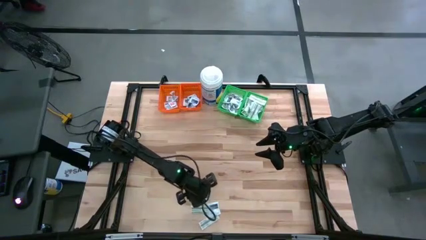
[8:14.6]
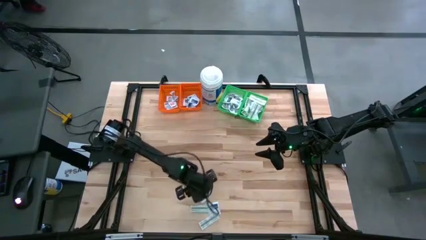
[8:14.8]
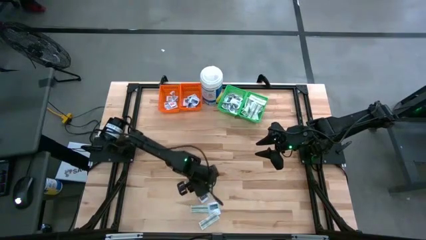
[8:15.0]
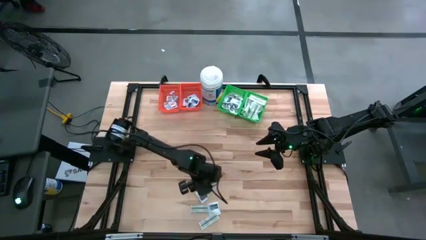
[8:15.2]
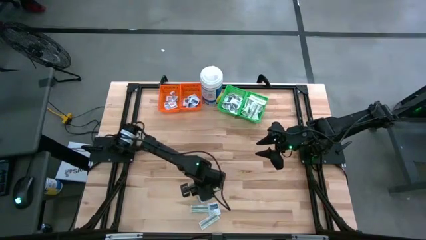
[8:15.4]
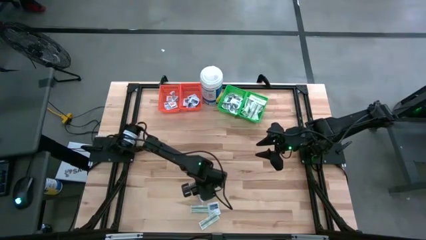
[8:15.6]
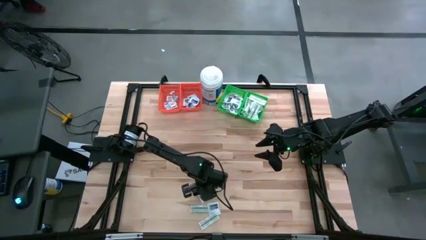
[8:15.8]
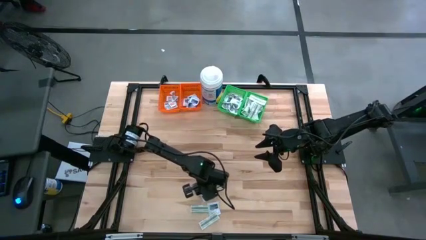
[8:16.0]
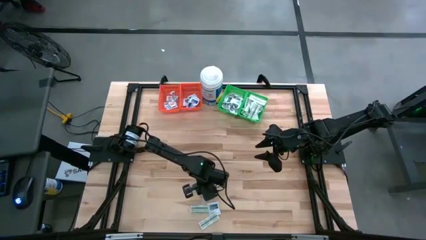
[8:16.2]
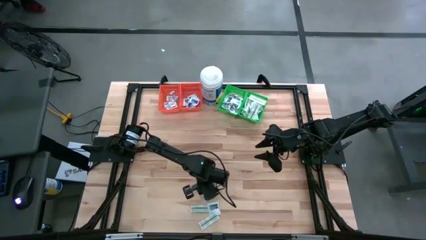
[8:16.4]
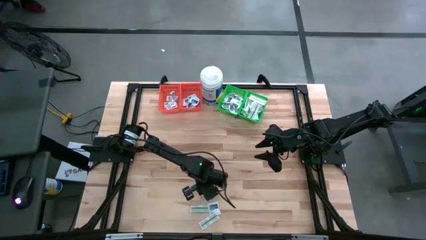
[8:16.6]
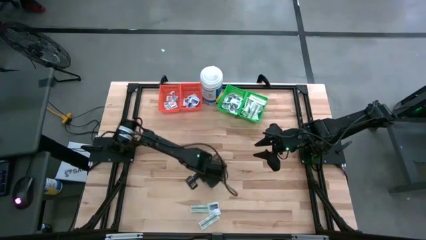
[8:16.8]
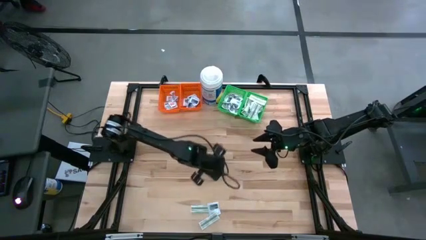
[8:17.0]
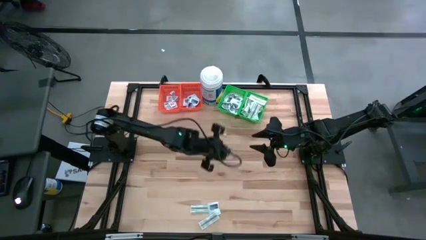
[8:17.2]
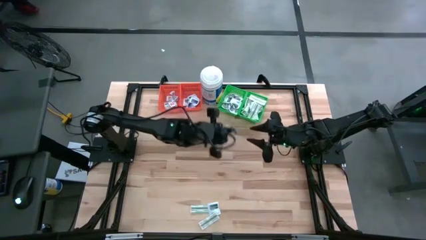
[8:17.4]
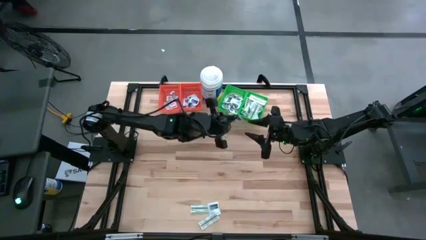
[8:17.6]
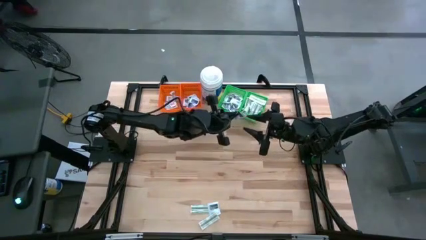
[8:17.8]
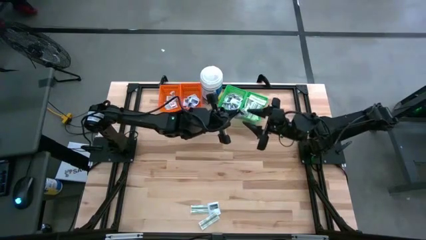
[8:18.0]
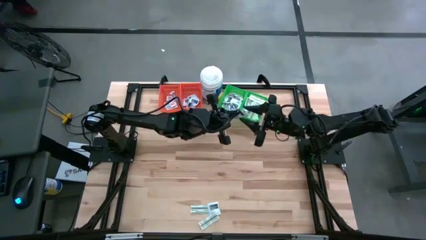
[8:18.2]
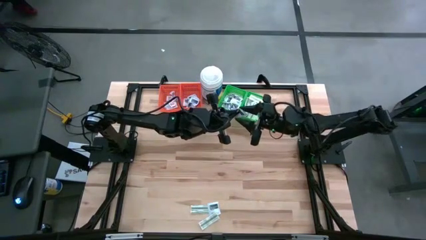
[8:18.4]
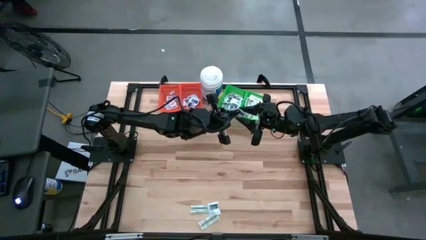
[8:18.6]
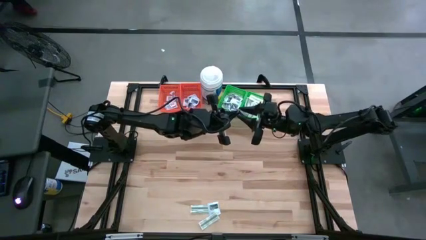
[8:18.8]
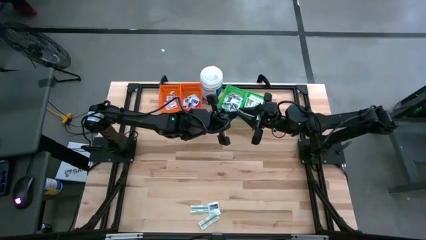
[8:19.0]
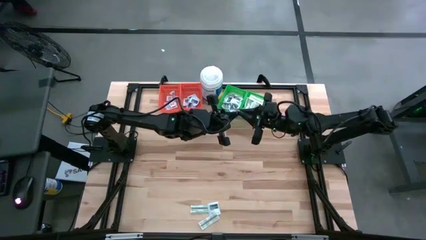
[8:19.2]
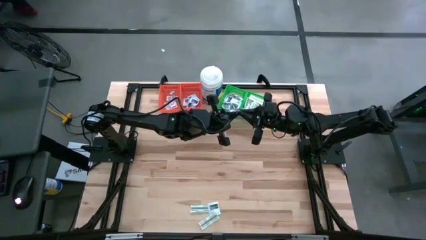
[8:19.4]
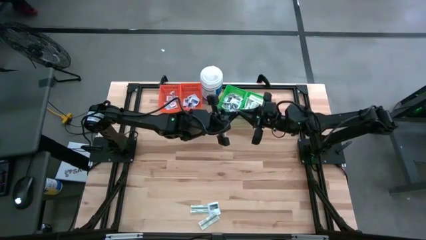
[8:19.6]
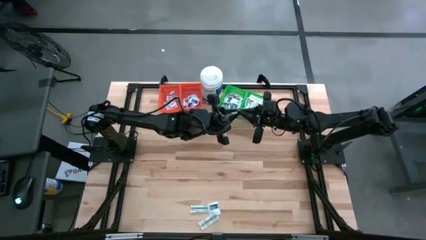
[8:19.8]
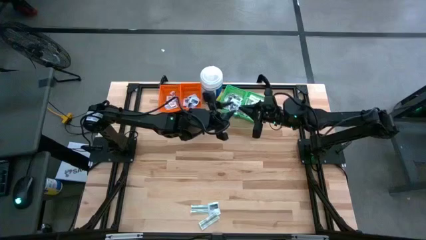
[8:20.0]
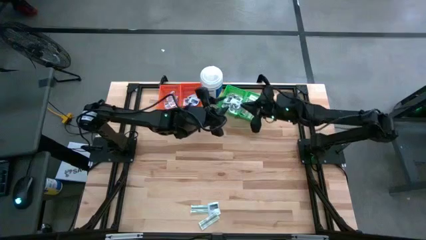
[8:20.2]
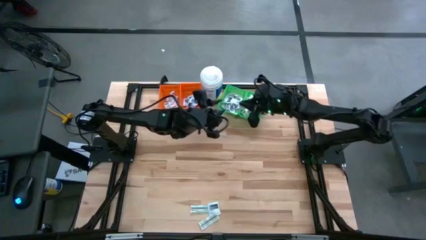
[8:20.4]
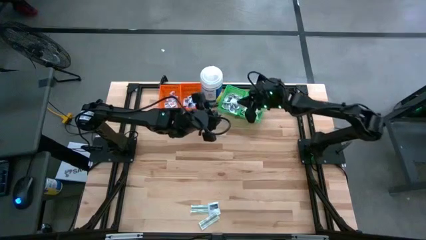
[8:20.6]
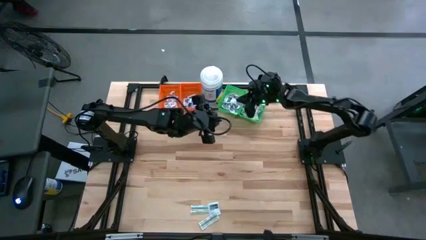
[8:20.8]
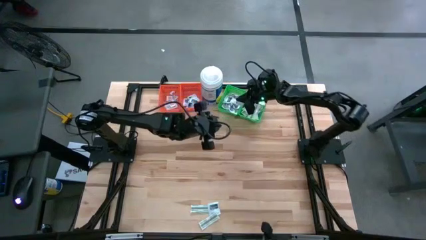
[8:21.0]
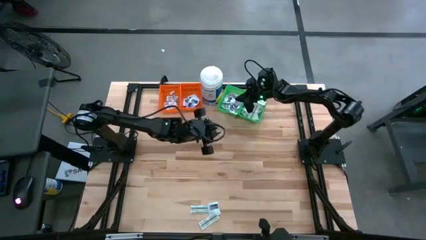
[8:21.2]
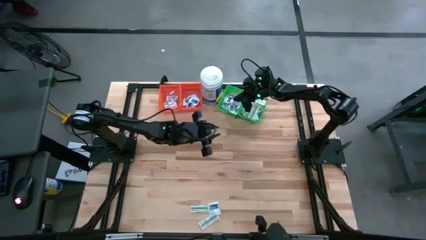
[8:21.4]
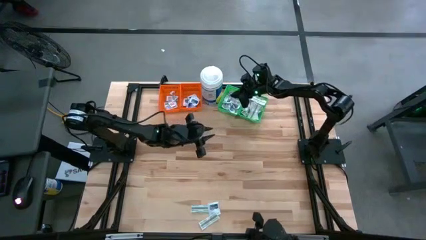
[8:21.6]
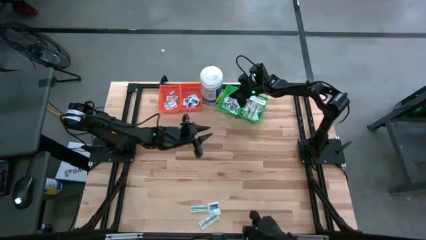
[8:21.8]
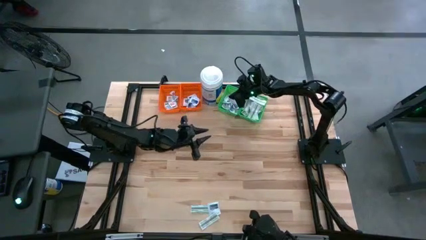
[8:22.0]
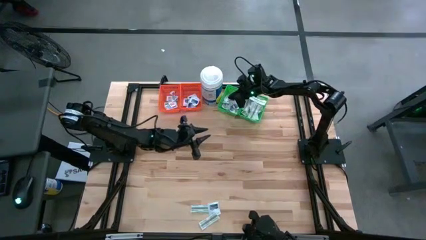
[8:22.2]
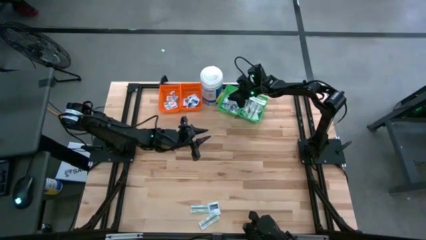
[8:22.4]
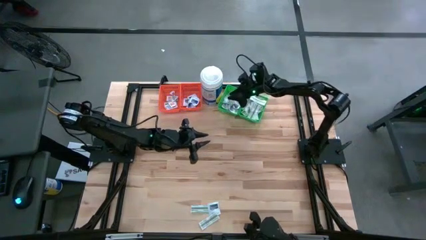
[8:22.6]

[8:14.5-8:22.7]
Task: Pick & Place First Aid Supplies
Put the black towelette pack into the left green bin

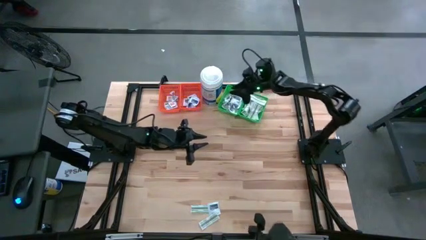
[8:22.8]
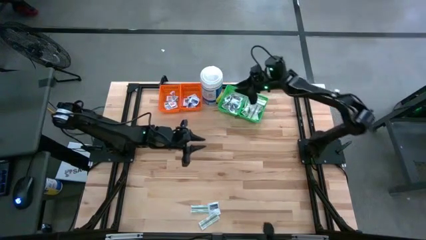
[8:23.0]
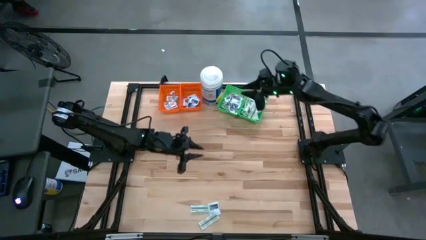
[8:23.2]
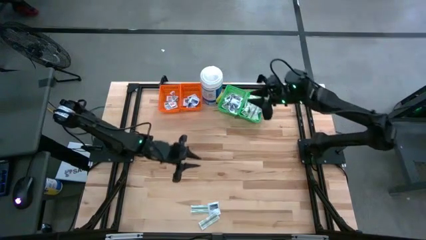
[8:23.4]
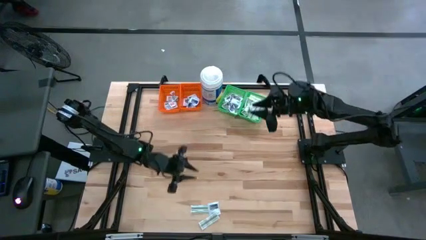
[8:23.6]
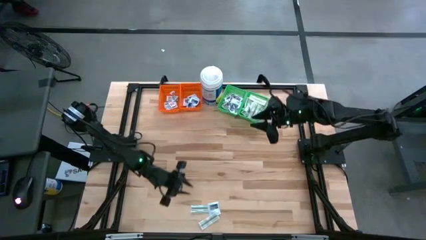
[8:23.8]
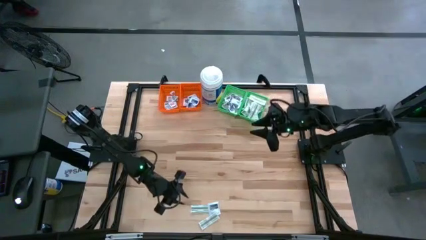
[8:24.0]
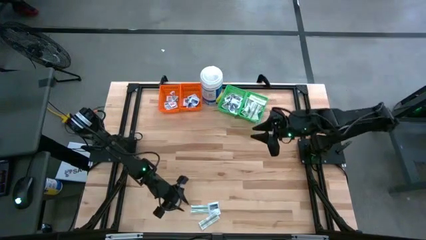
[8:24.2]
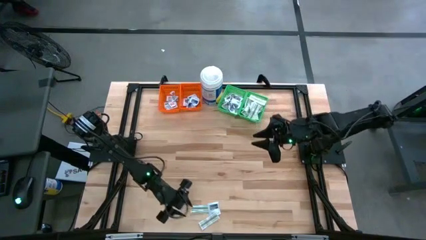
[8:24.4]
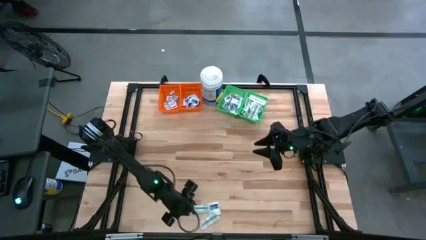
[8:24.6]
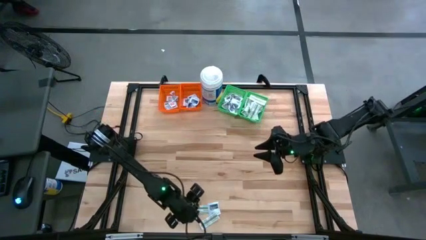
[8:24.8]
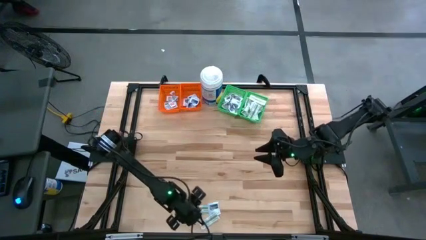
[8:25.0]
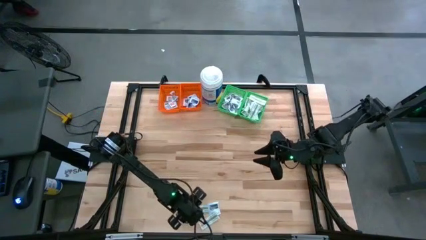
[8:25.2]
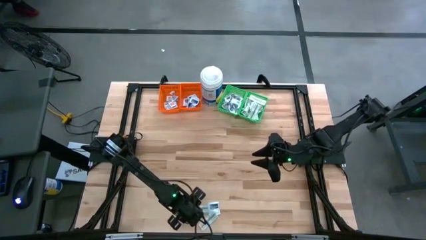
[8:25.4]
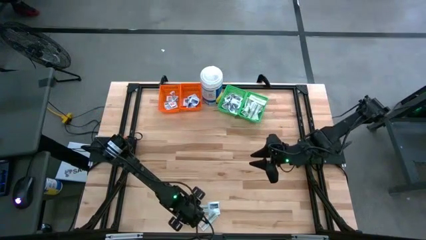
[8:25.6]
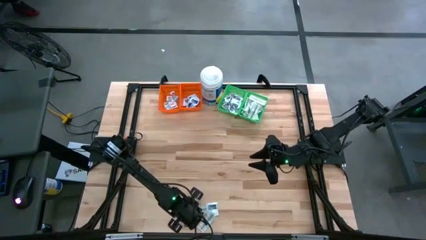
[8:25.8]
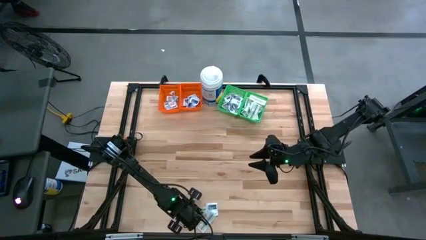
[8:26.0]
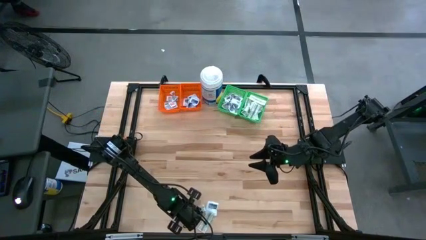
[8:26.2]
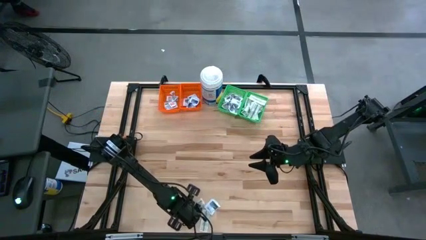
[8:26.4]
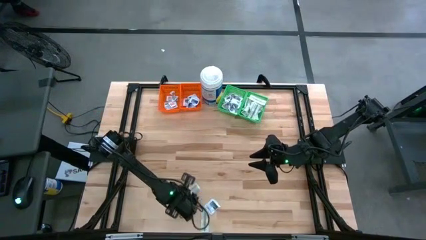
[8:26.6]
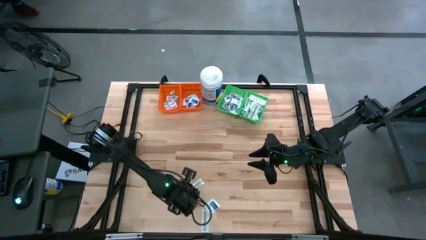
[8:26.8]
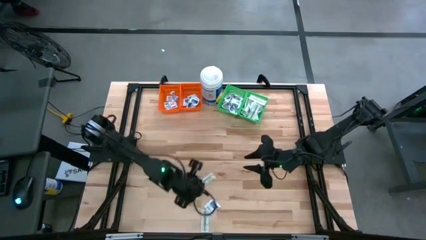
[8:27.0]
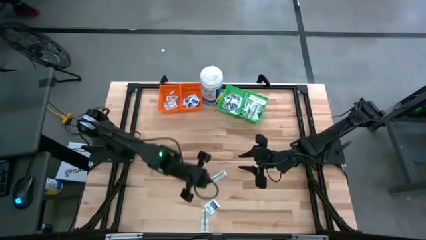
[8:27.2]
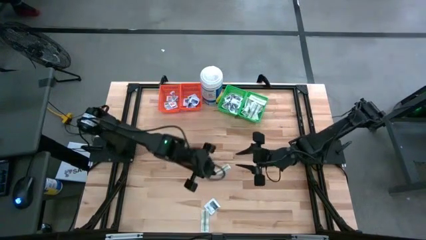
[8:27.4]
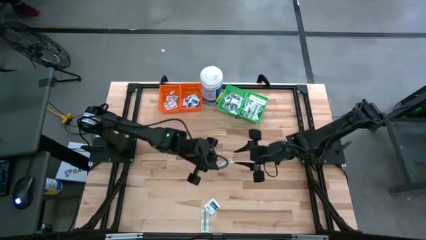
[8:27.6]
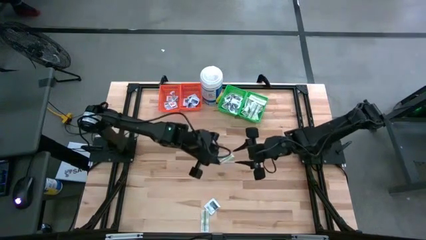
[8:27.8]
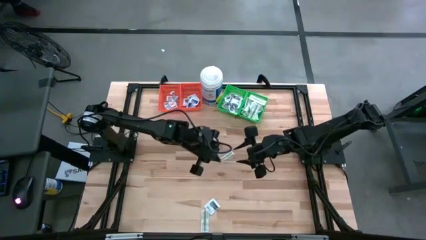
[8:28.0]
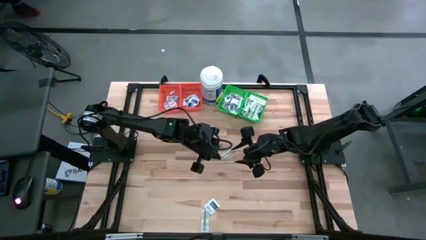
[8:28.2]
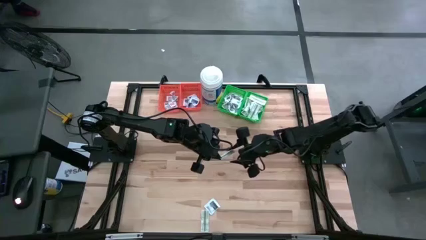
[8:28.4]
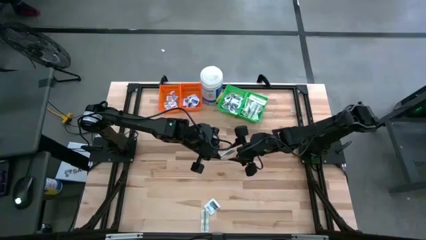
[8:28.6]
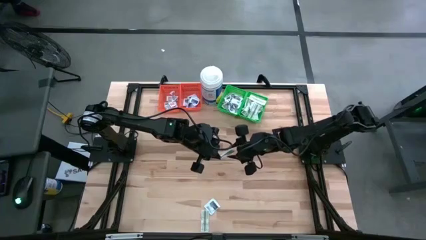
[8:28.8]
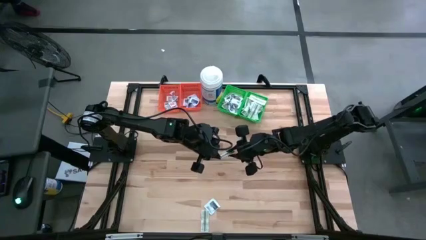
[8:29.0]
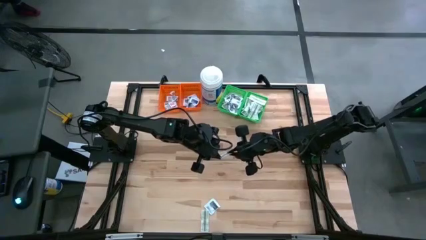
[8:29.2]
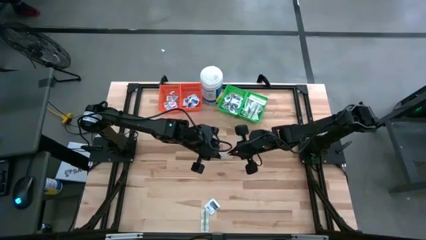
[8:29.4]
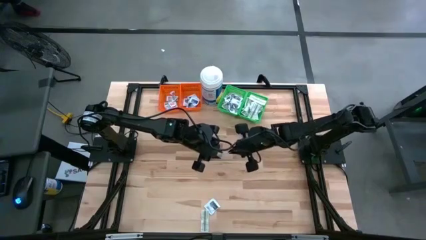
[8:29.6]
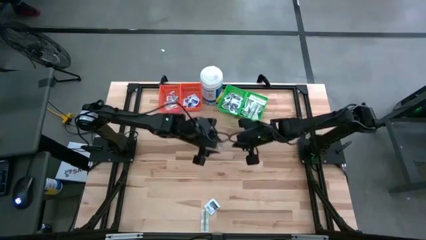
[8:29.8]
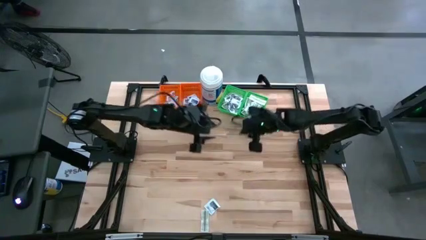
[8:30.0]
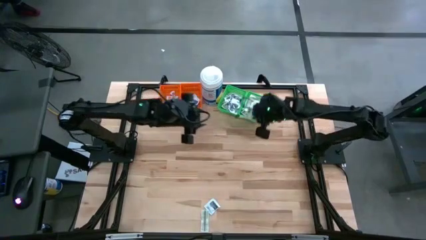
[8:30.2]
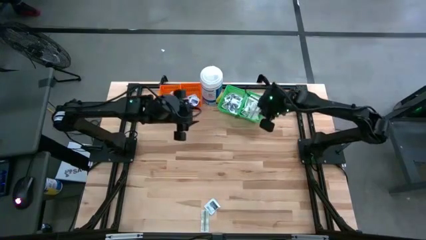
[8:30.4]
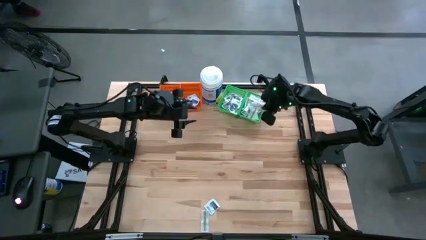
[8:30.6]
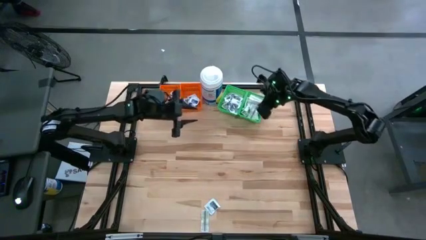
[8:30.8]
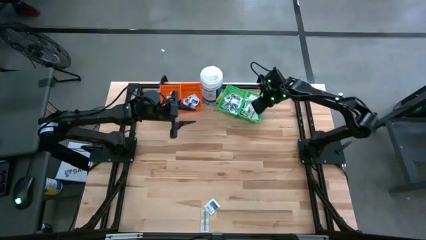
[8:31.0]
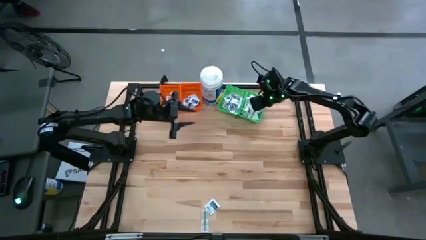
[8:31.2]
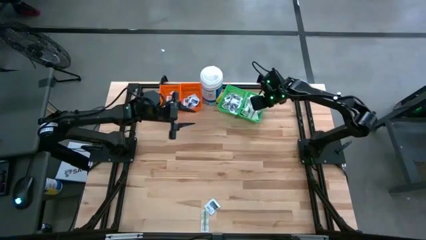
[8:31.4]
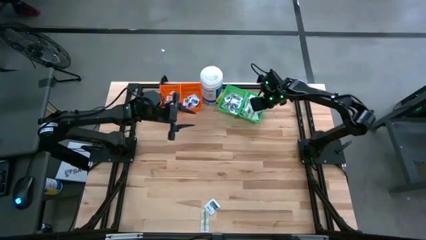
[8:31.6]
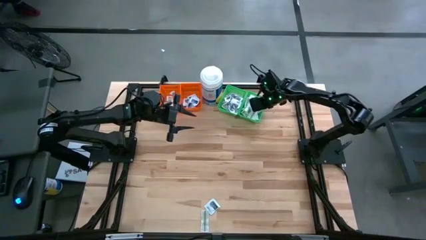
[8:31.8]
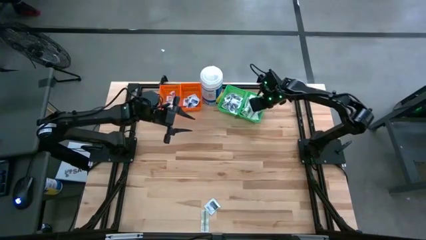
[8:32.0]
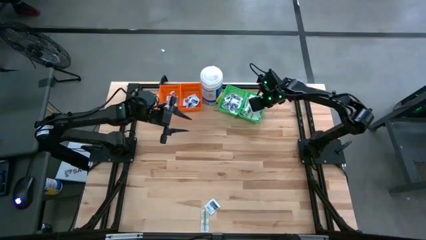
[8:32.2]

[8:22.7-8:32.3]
Put the green bandage pack into the right green bin
